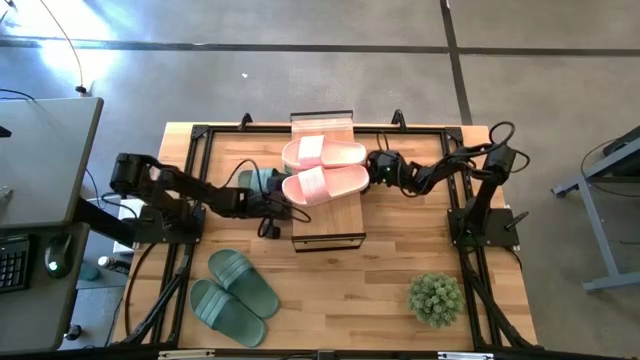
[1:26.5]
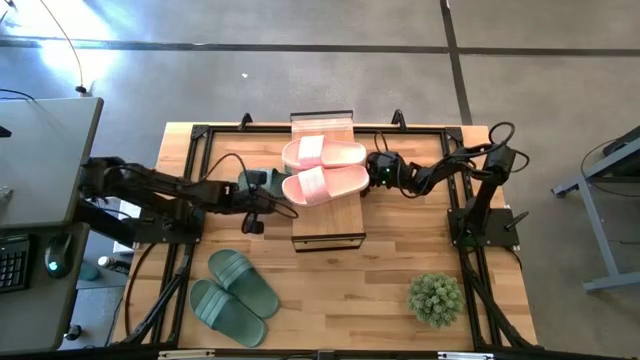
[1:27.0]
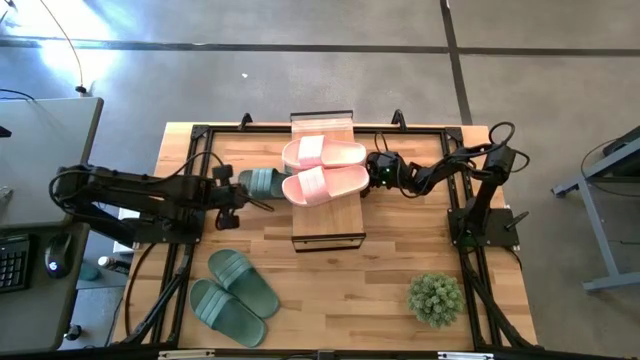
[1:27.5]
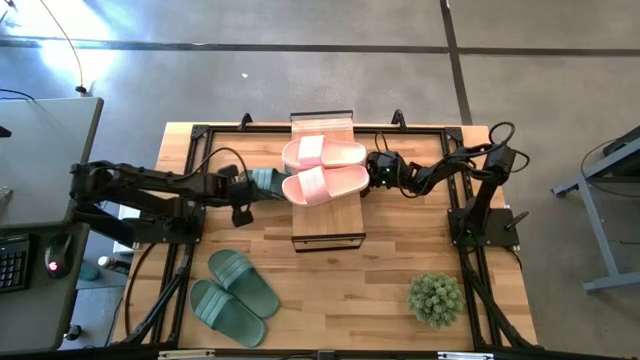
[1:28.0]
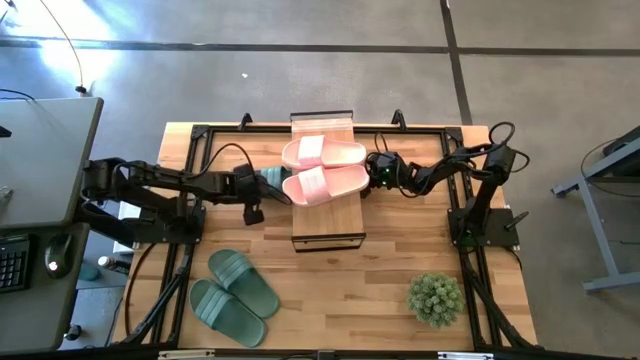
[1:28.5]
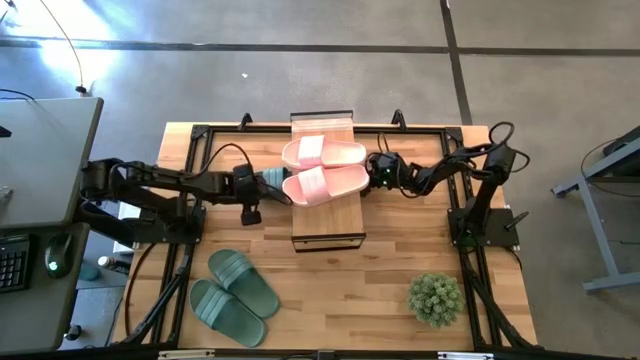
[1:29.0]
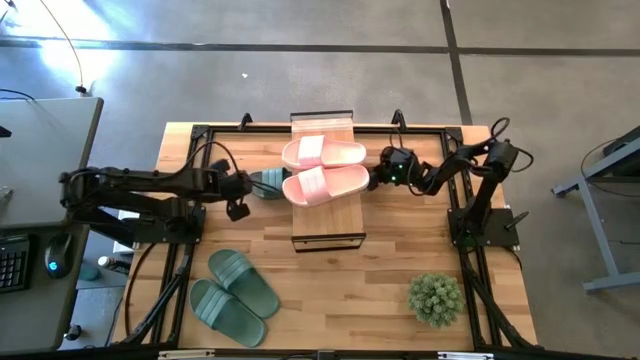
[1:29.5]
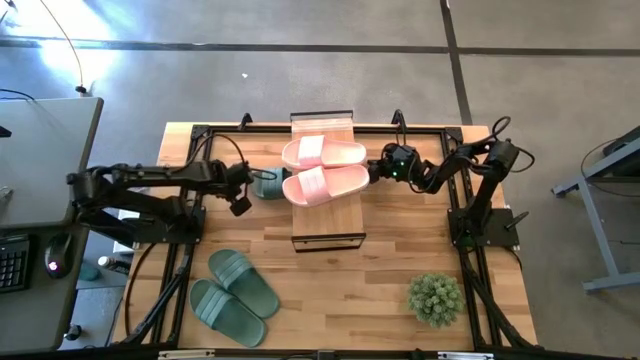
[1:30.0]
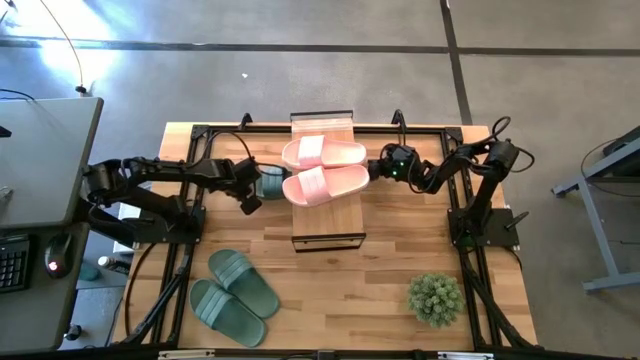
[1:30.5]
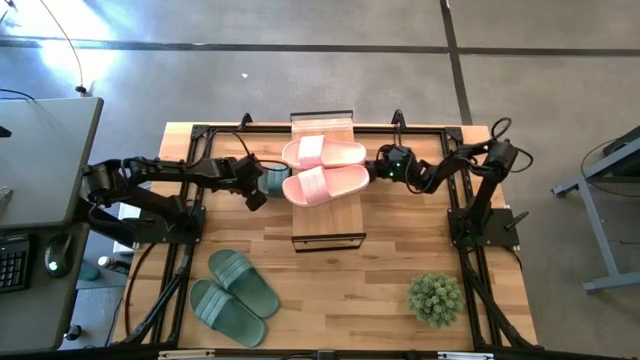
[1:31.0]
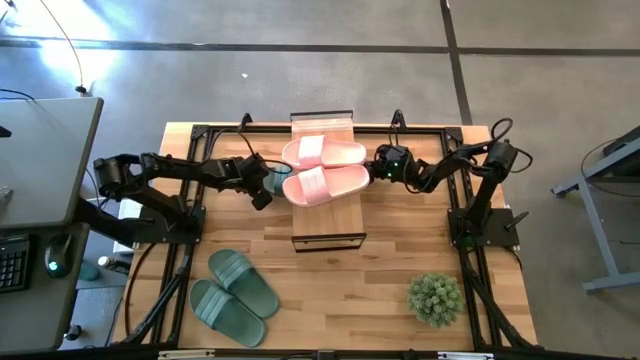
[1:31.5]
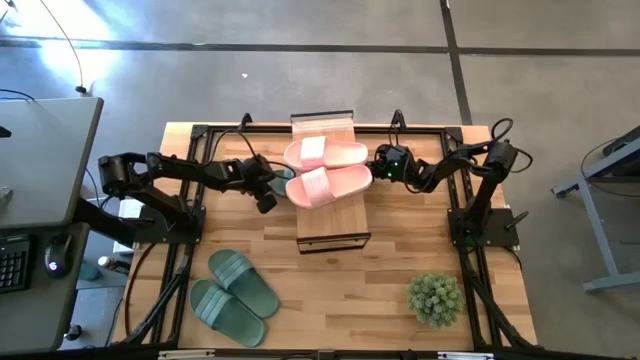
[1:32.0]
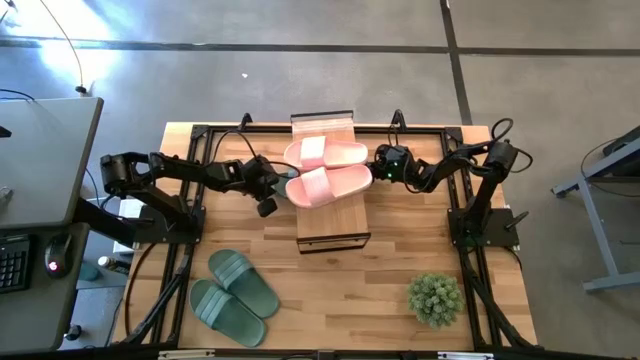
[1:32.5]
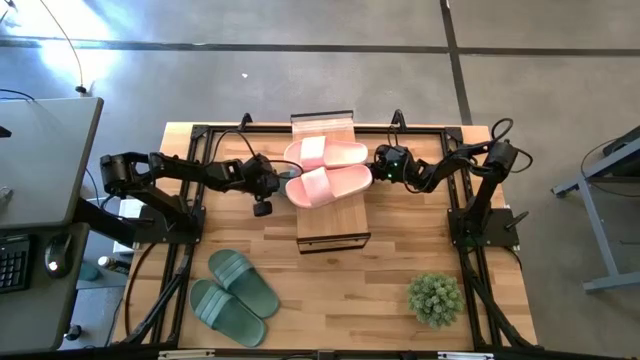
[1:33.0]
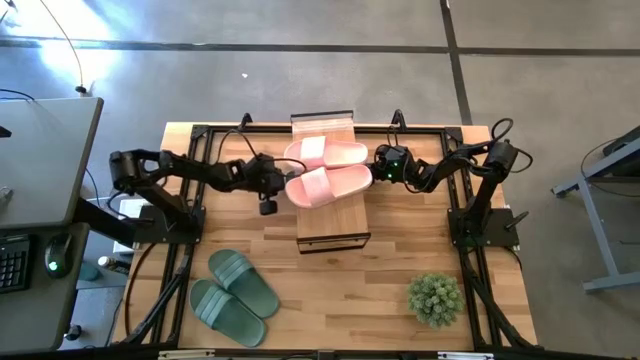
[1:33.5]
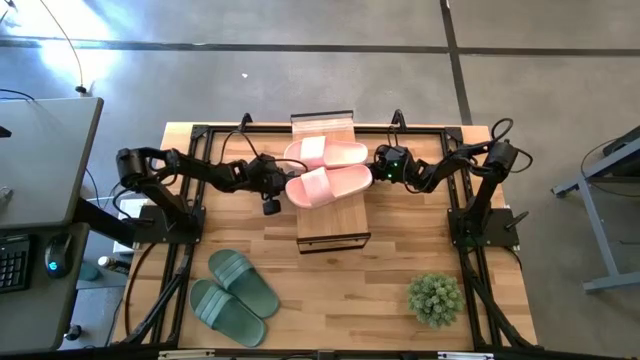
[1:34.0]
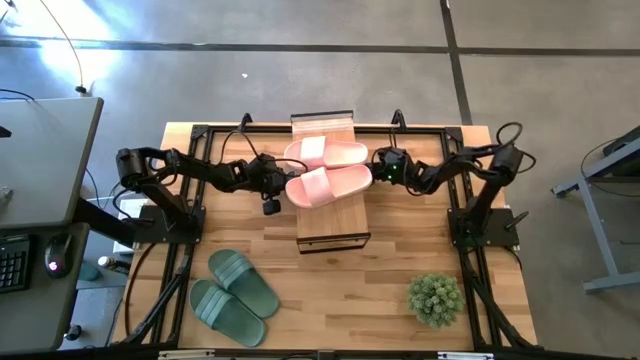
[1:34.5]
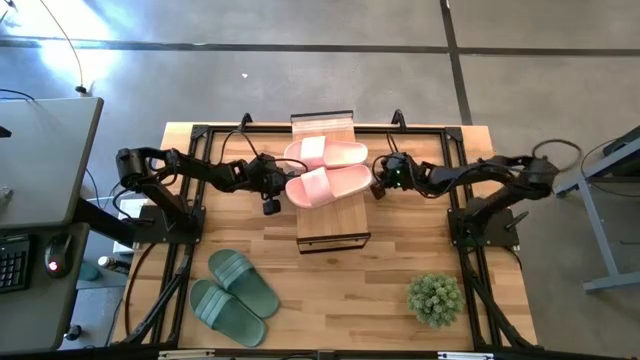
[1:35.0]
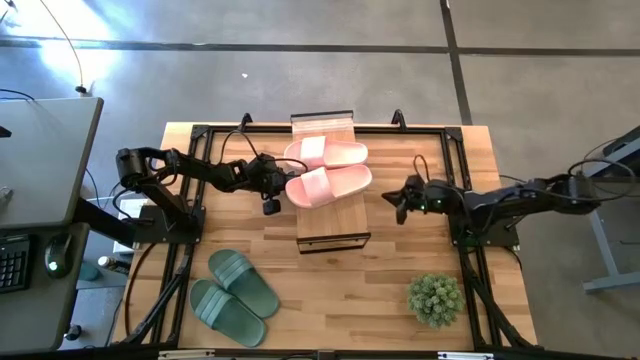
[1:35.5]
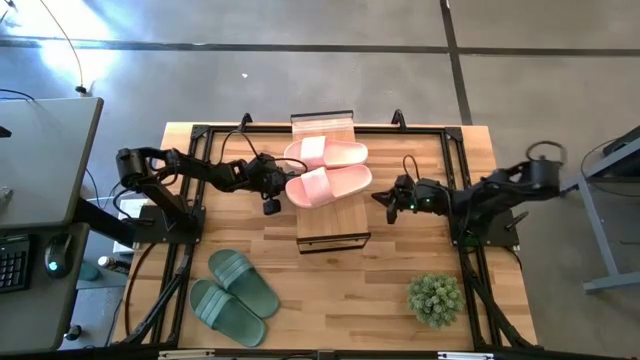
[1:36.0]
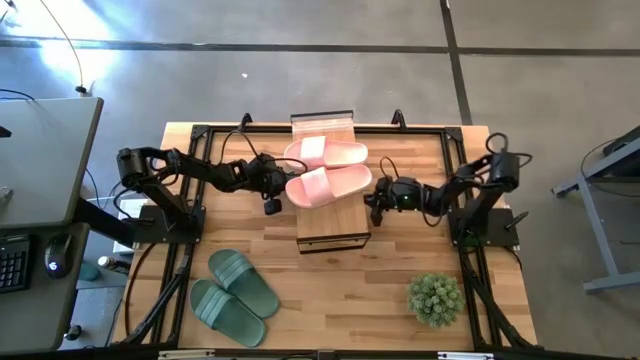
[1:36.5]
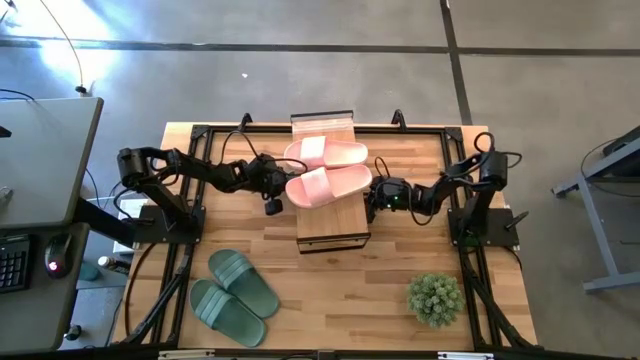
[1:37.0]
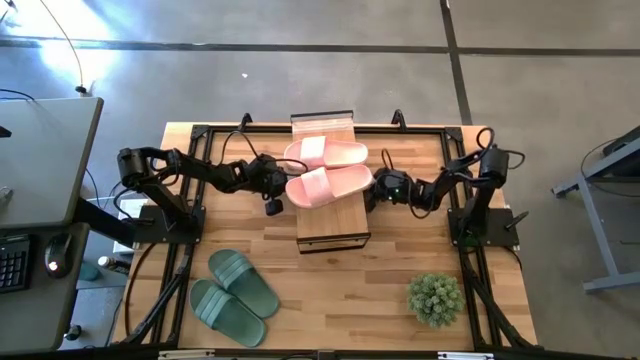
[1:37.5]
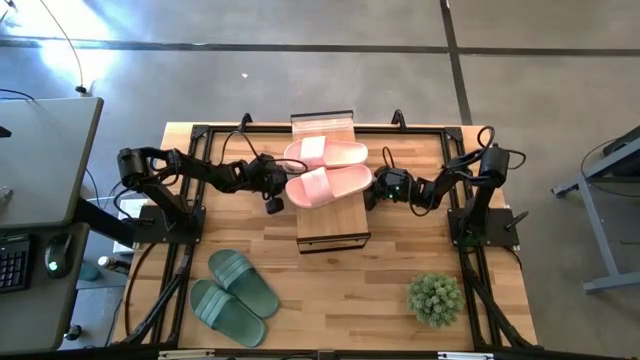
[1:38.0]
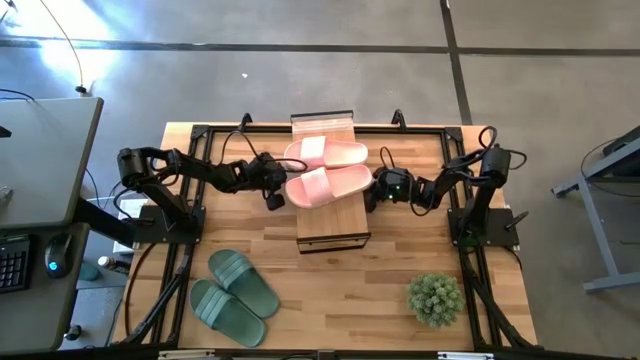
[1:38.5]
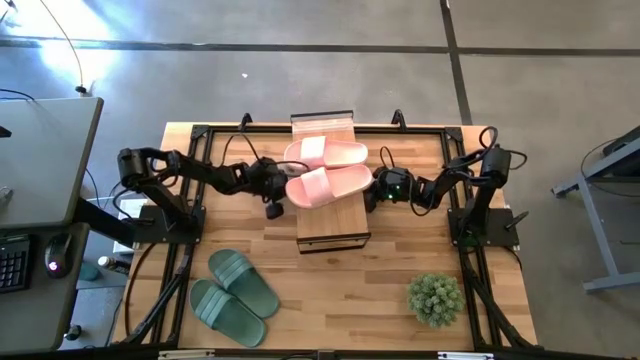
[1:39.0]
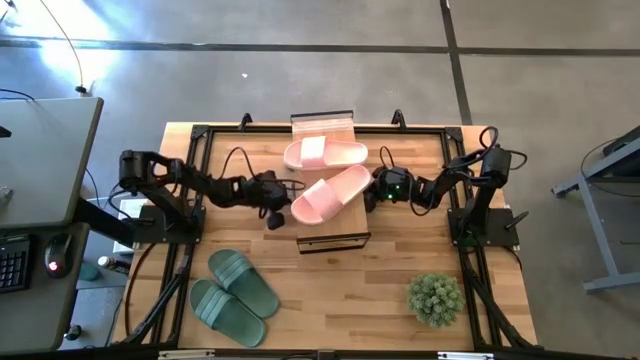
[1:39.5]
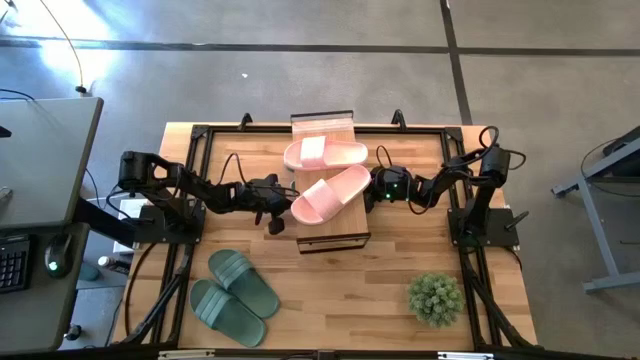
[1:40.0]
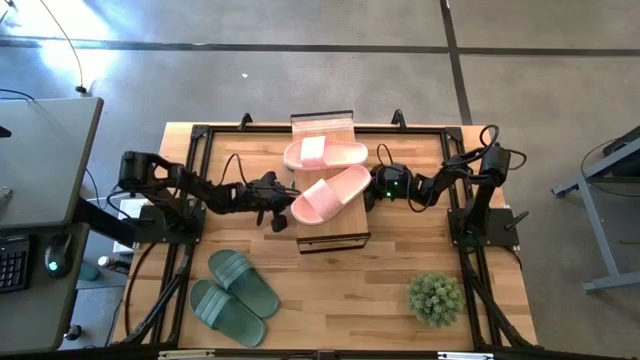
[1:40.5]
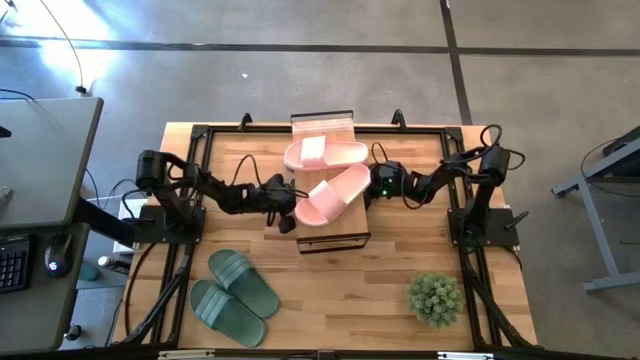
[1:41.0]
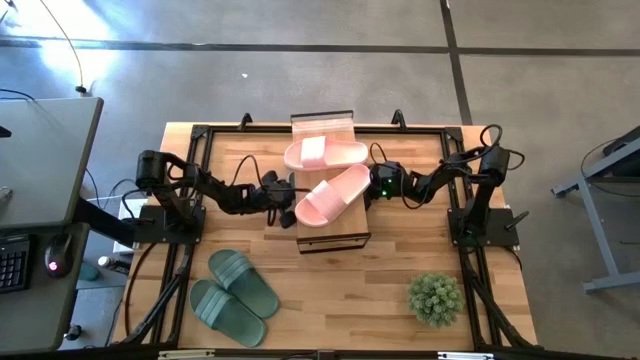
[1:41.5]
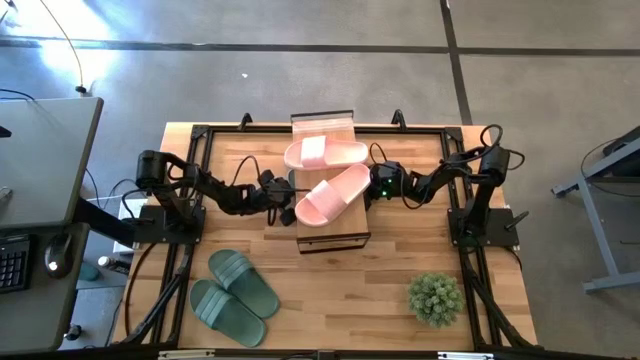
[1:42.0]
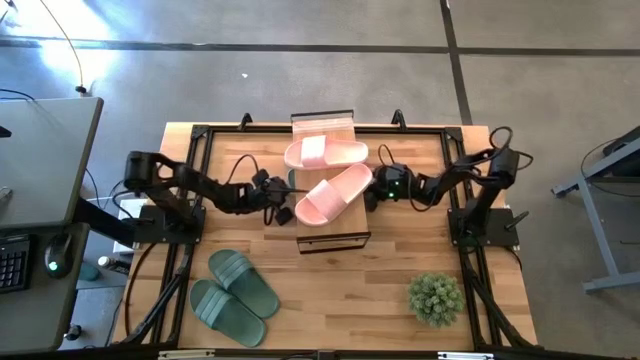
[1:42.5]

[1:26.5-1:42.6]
Task: Pick and place slides into the shelf
Put the green slide under the shelf

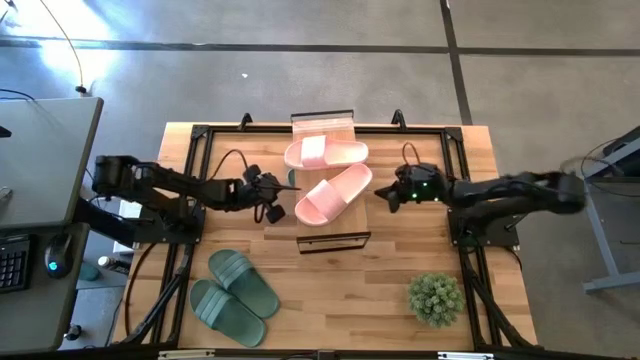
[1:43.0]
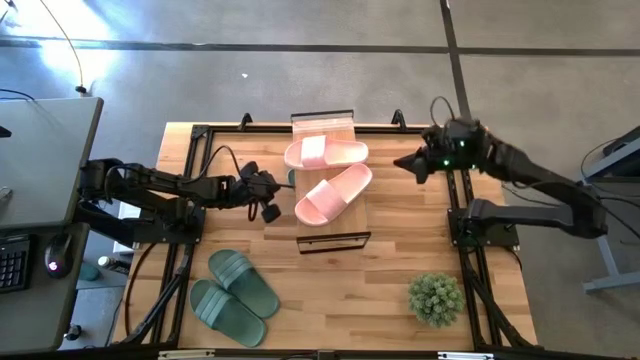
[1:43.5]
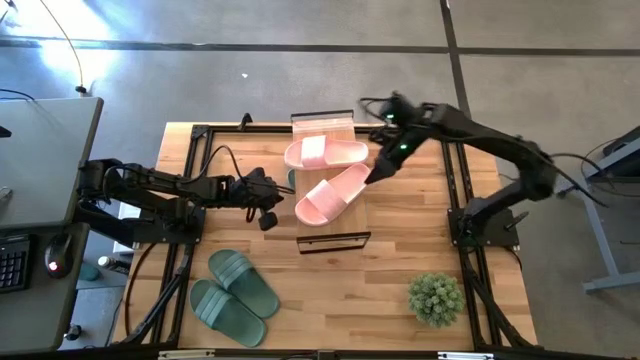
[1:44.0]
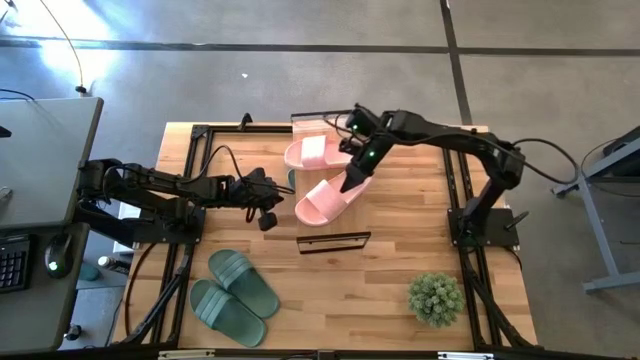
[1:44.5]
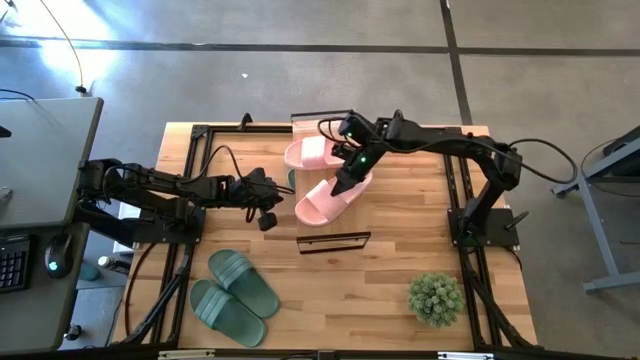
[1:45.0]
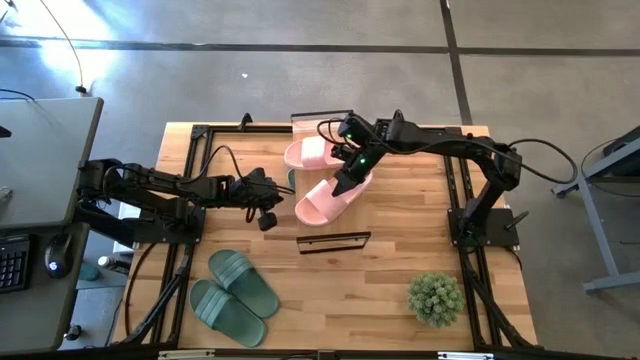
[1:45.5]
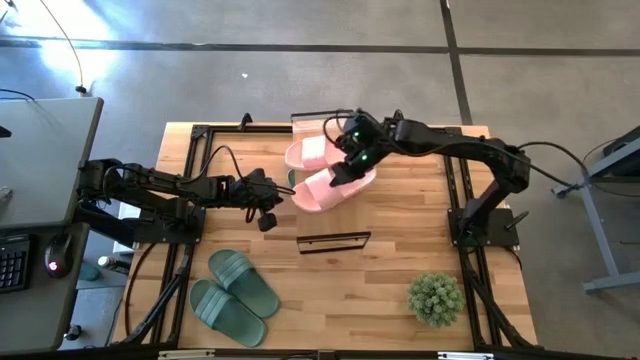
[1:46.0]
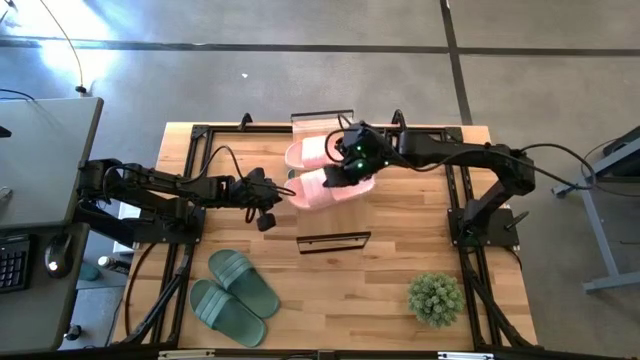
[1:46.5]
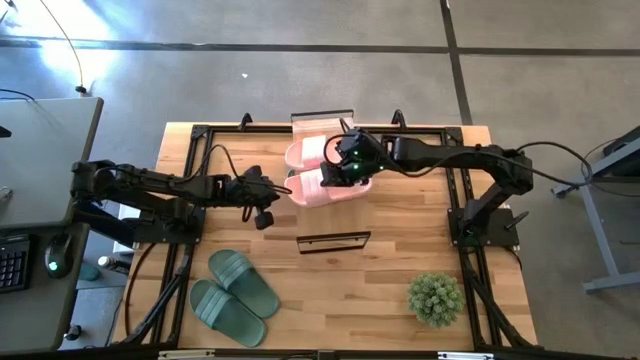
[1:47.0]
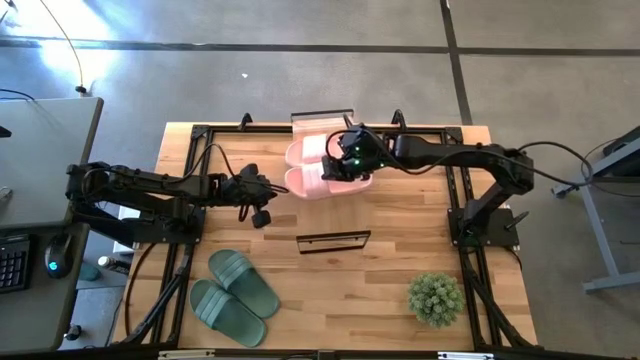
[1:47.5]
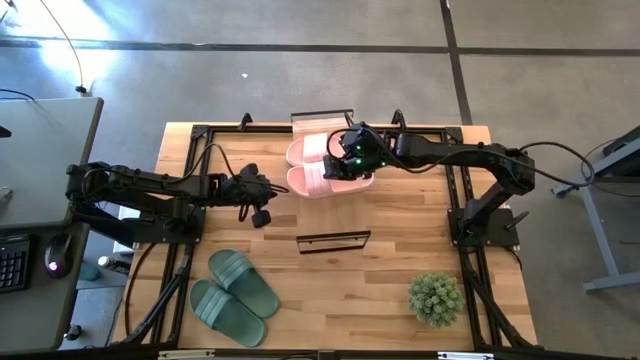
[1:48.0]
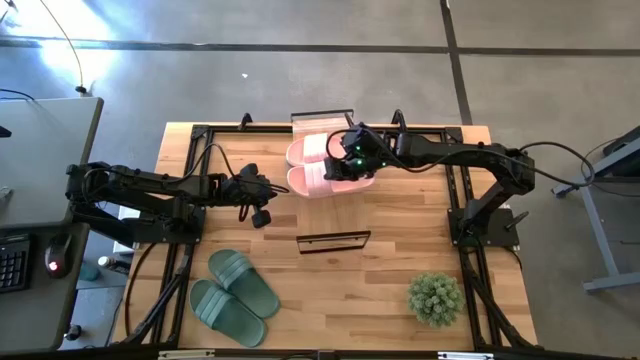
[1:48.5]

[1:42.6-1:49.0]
Adjust the pink slide
